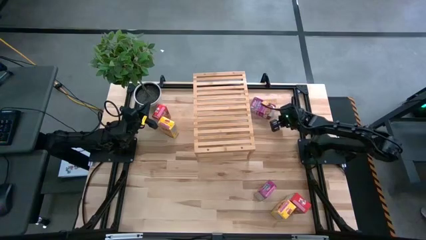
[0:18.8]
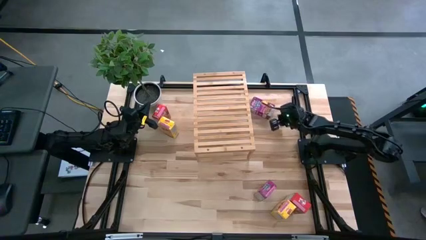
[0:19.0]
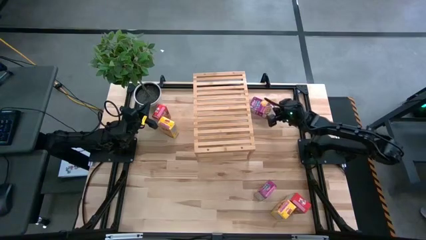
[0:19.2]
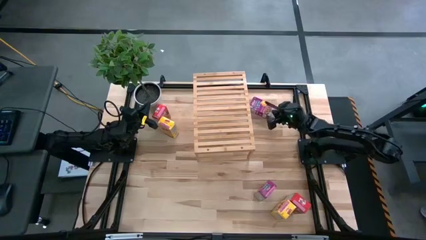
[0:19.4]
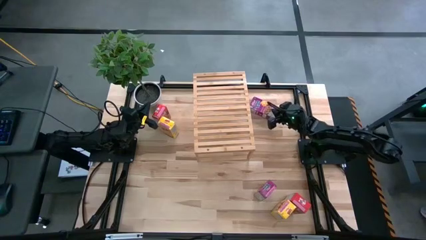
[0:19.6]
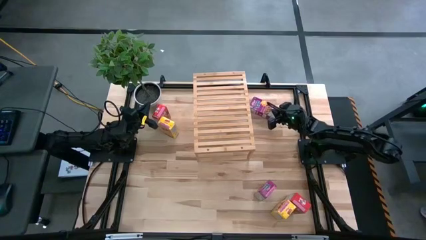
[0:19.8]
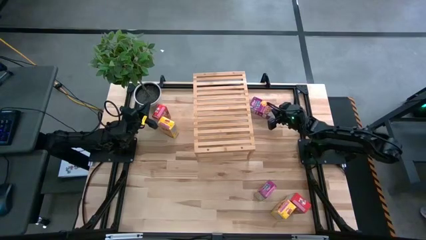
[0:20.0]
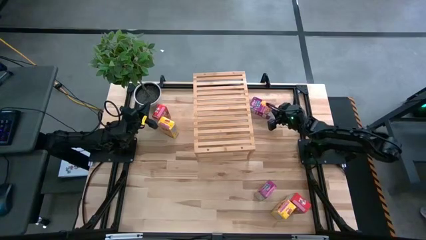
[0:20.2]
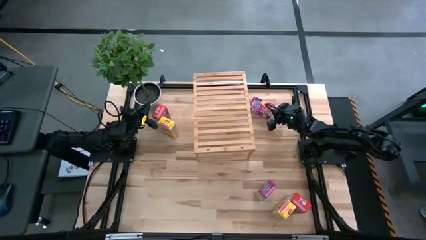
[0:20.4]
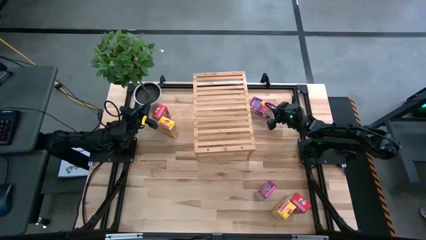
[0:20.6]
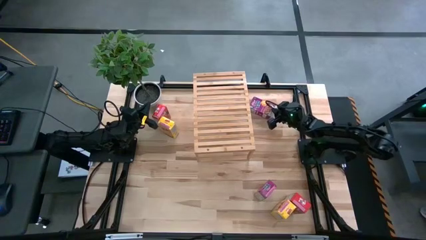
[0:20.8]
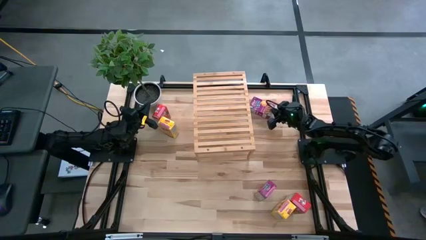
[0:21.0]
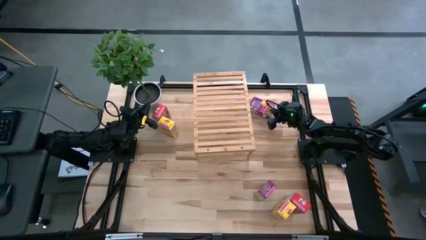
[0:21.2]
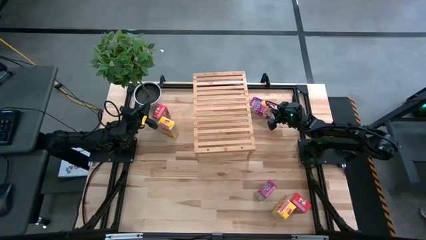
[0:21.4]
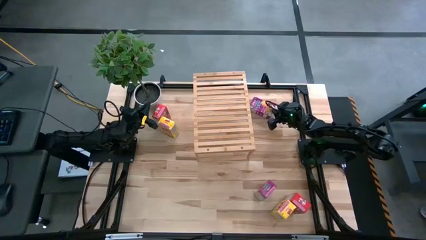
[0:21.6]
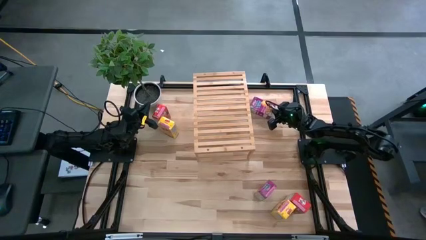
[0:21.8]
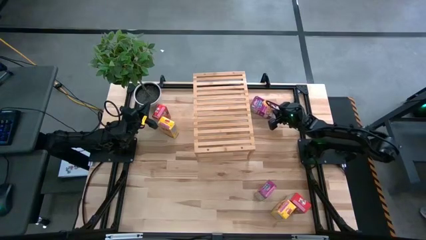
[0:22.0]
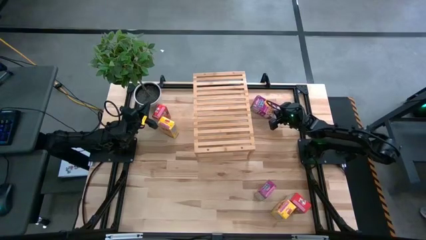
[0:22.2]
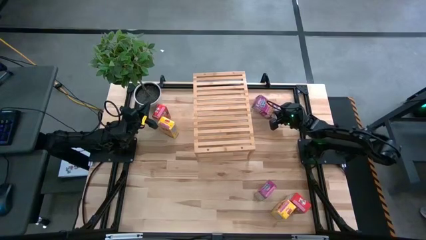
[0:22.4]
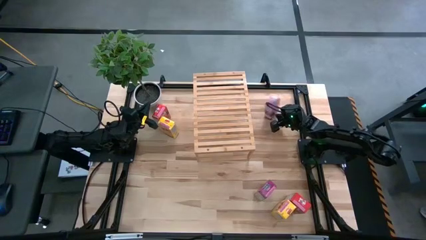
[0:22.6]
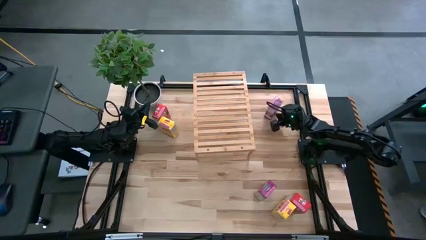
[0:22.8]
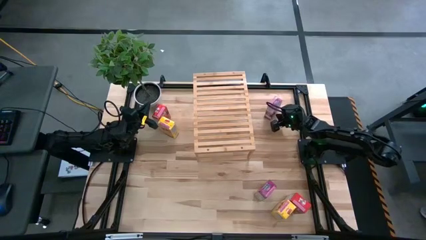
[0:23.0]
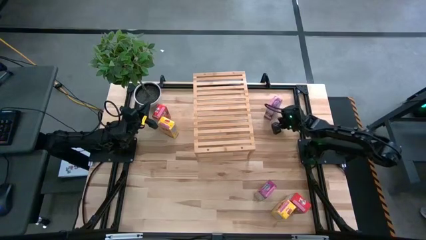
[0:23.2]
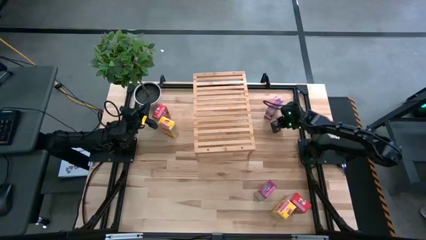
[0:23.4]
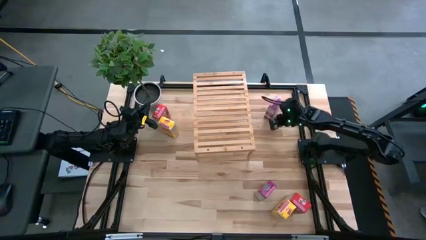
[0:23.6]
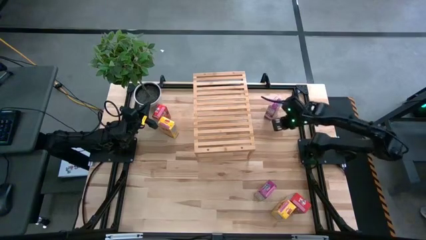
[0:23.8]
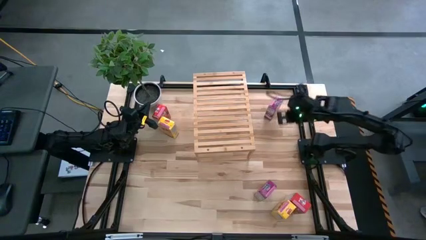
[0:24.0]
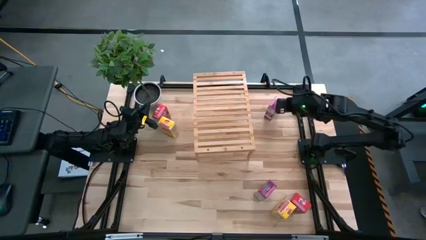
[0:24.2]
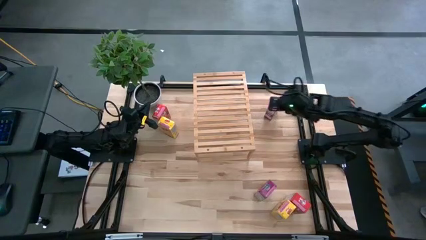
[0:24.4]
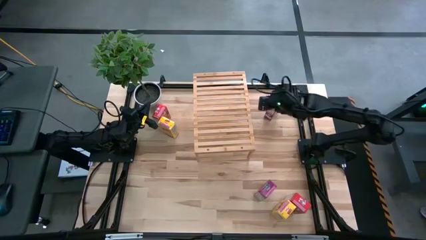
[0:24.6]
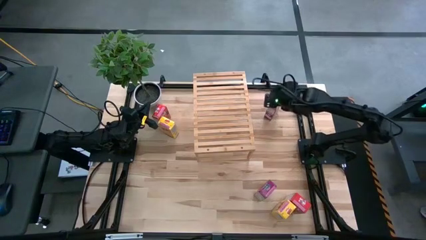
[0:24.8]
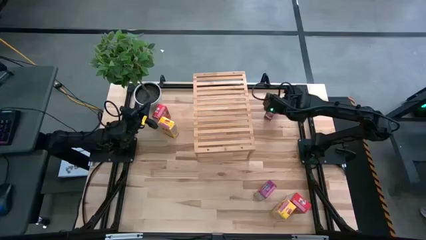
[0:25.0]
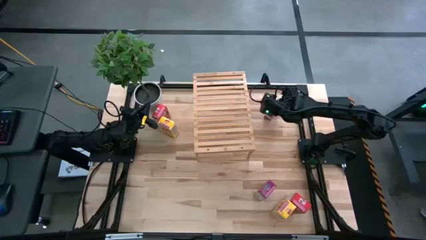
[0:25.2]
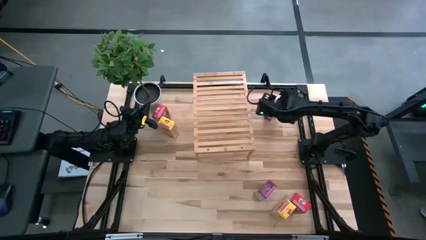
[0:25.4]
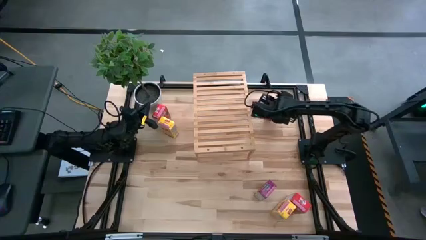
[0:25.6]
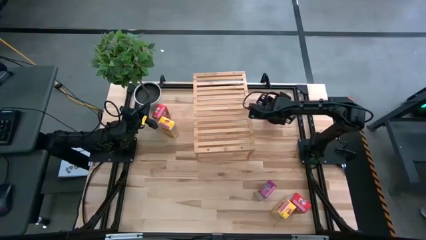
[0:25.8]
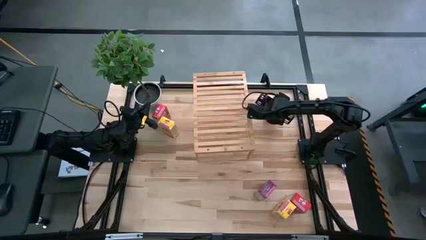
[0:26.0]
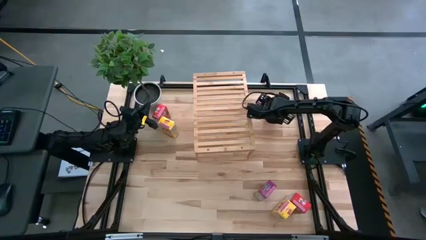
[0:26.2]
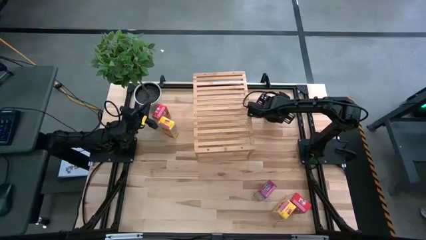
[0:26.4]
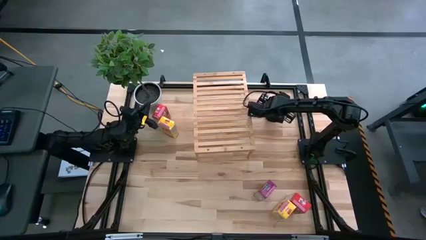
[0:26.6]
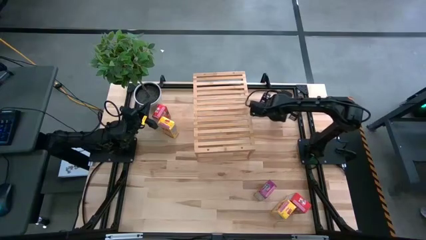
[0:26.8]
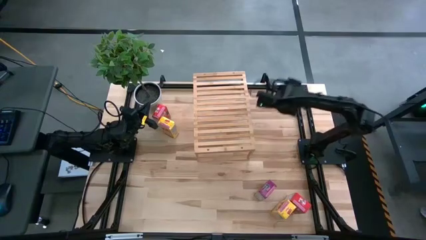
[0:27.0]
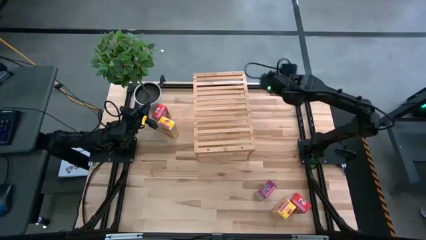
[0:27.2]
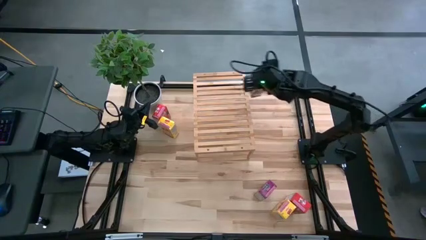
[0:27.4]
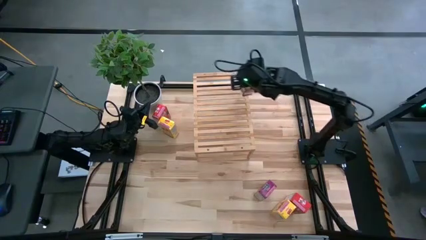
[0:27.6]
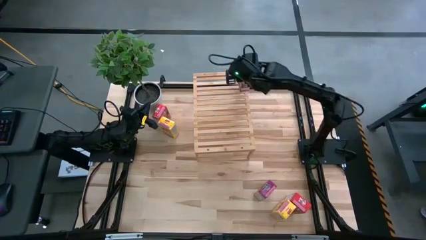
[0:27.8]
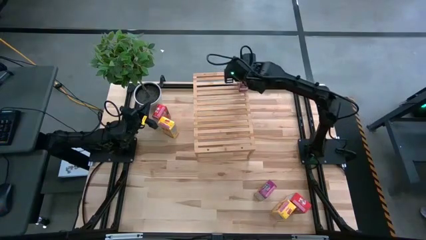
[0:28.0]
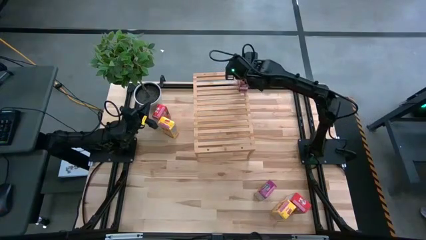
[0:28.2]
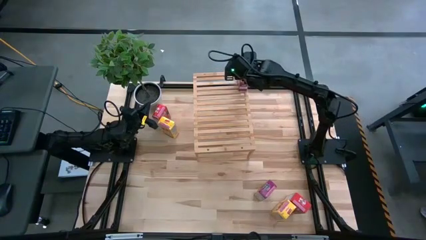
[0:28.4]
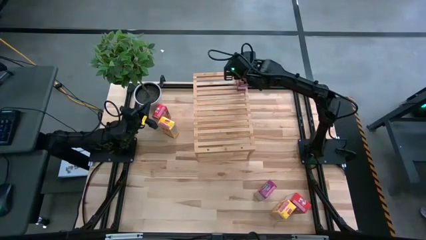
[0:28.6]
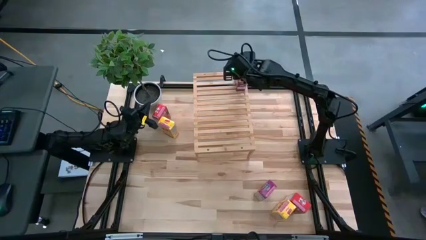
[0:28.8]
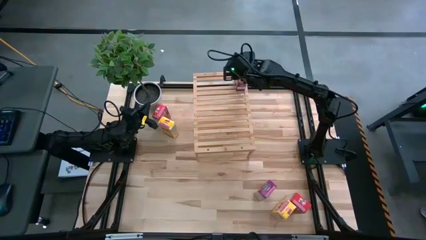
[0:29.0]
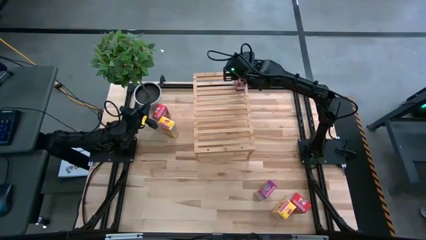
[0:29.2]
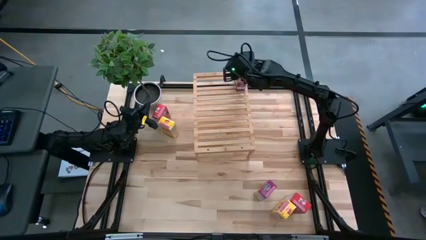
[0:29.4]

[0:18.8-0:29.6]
Task: Stack cereal on shelf
Put the top violet cereal box on the shelf
